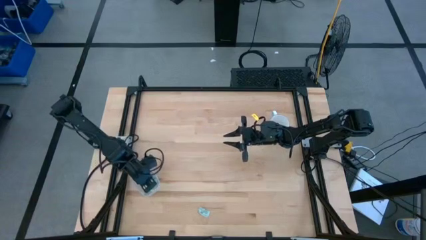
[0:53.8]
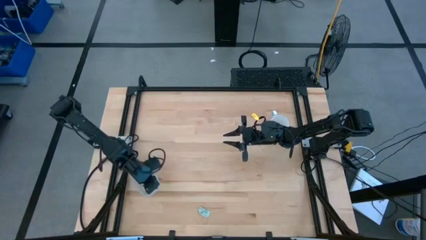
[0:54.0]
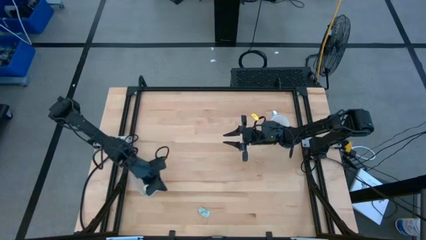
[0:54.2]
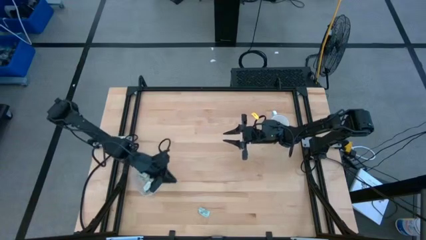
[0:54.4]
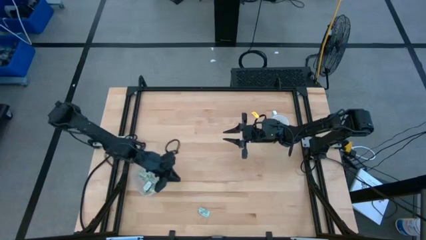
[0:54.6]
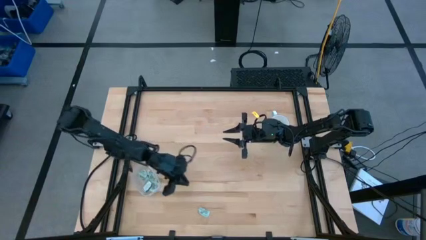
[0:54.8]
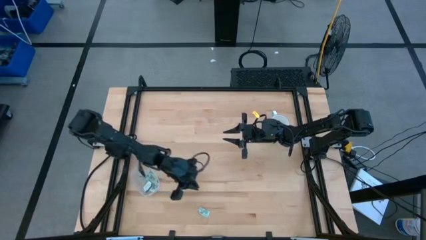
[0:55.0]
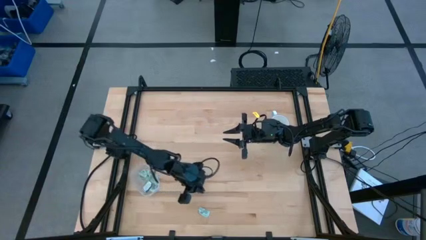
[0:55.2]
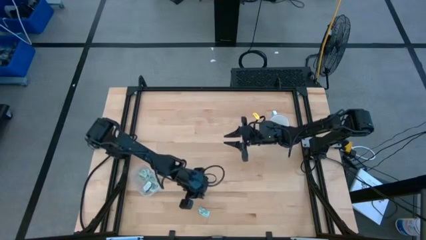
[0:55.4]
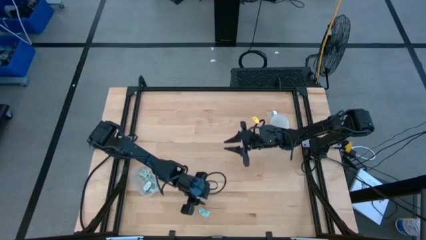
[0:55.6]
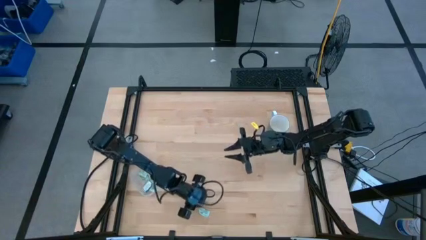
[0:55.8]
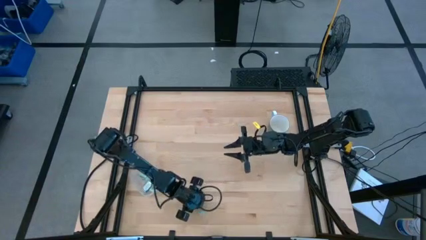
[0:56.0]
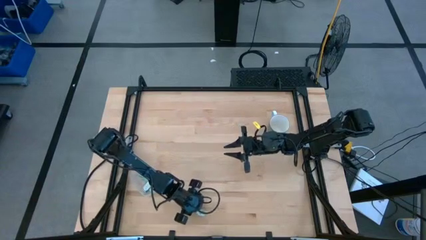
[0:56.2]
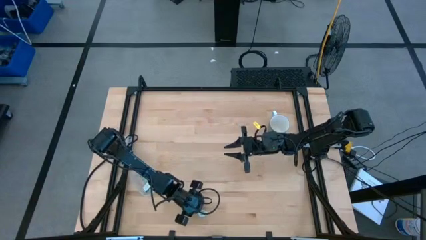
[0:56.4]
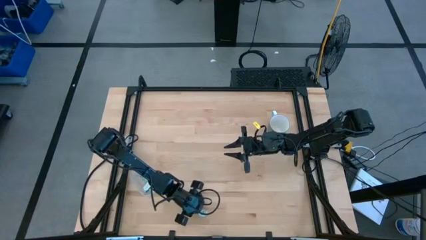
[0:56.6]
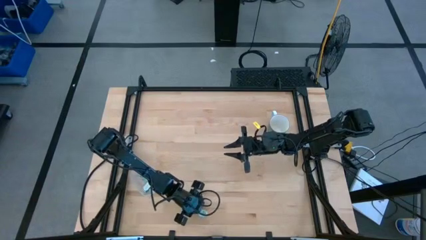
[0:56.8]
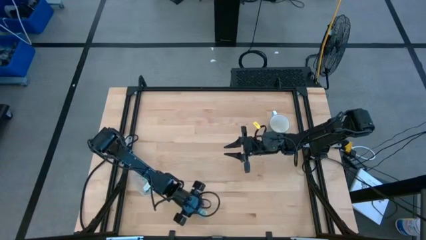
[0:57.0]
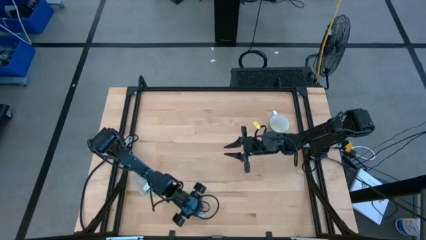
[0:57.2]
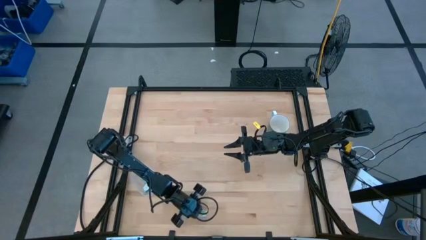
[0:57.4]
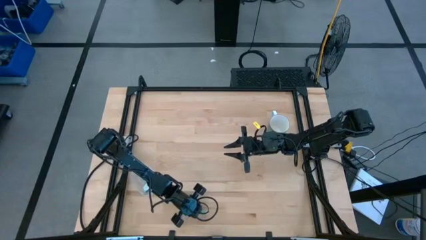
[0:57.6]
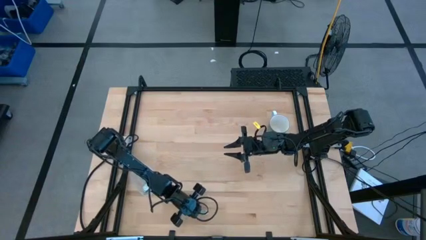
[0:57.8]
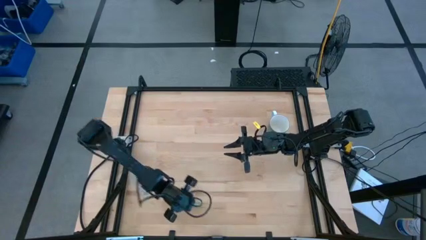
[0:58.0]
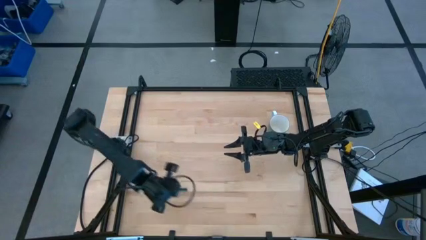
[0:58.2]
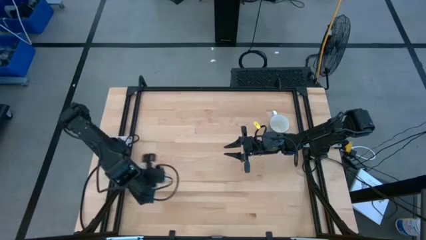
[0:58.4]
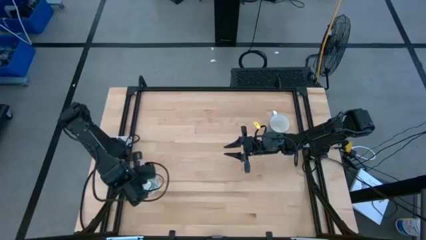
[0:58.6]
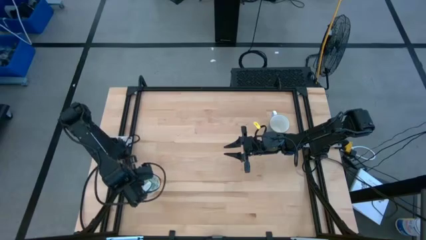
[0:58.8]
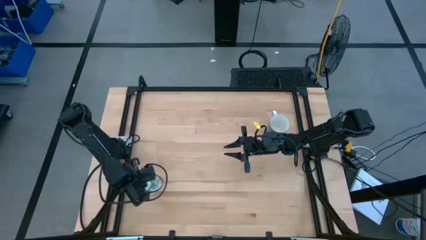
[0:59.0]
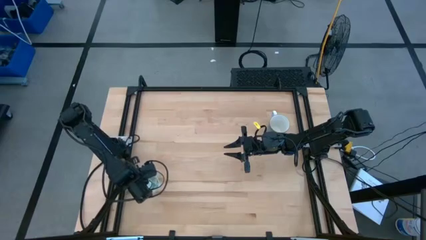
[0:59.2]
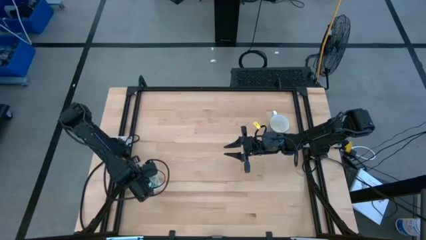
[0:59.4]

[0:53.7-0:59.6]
Task: Pick and place Stevia / Truvia into bins
Put the stevia packet into the transparent container

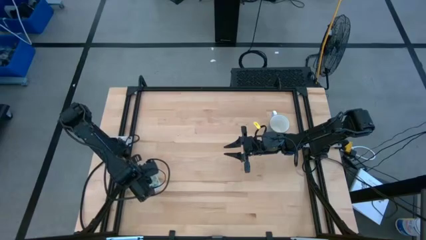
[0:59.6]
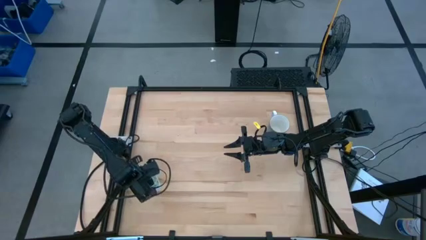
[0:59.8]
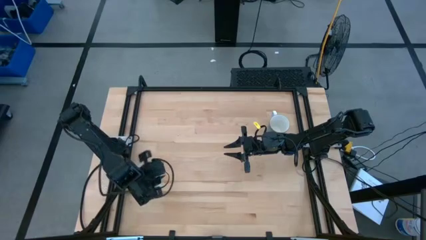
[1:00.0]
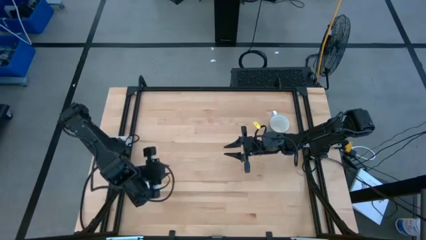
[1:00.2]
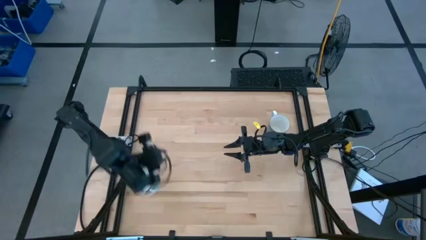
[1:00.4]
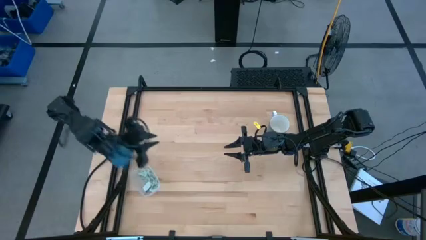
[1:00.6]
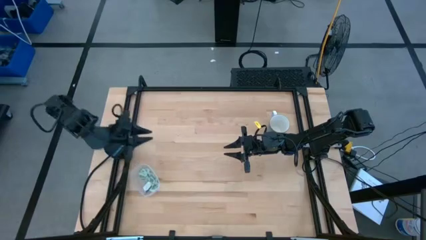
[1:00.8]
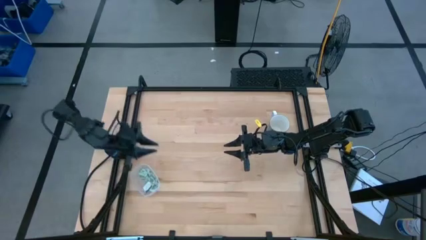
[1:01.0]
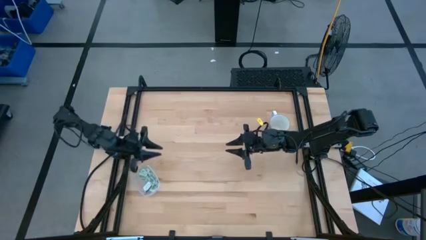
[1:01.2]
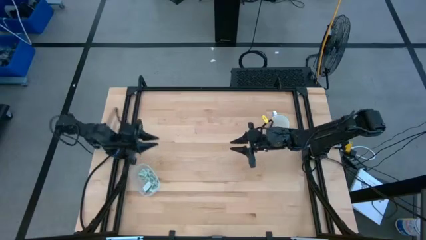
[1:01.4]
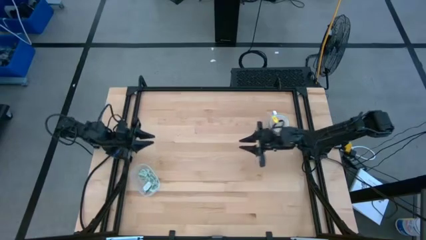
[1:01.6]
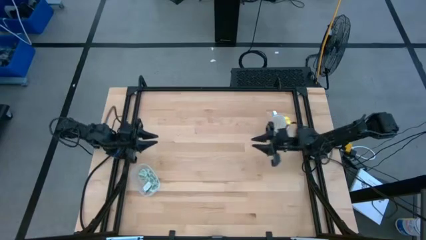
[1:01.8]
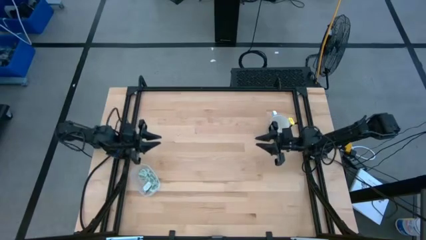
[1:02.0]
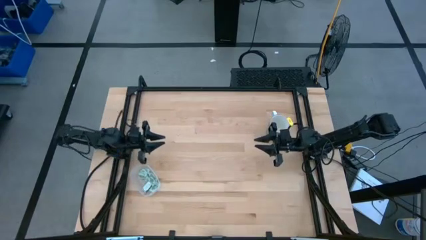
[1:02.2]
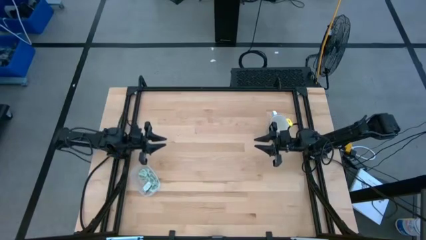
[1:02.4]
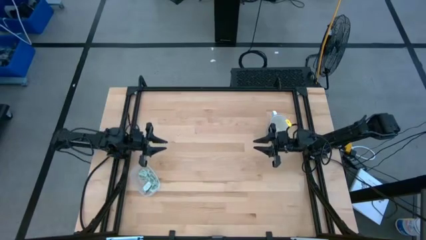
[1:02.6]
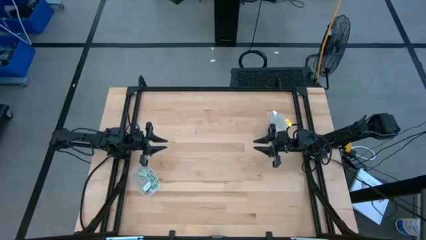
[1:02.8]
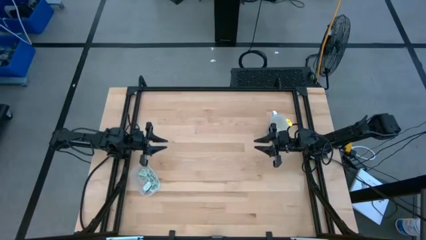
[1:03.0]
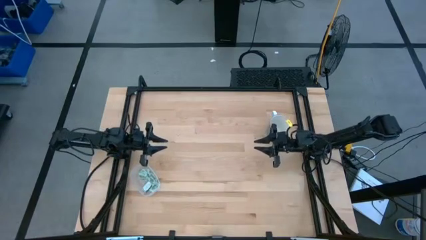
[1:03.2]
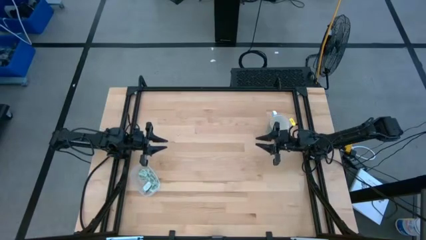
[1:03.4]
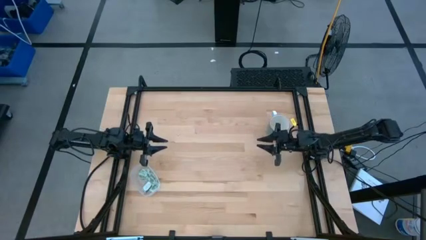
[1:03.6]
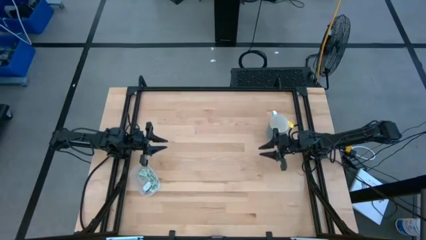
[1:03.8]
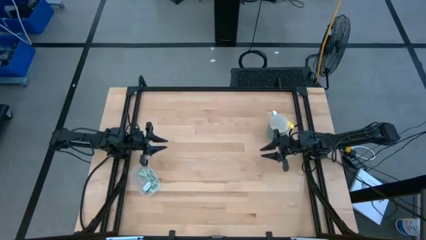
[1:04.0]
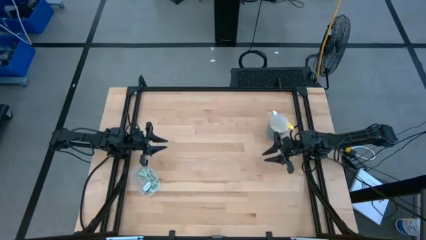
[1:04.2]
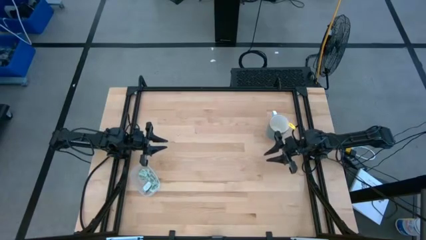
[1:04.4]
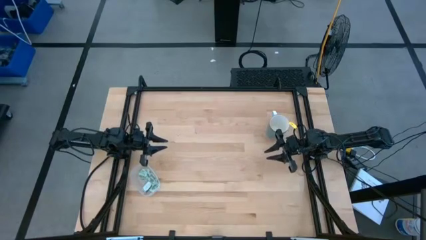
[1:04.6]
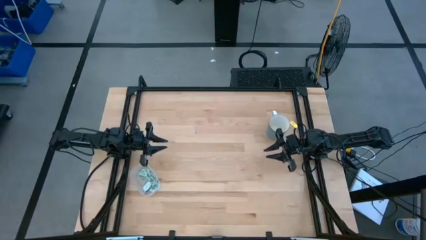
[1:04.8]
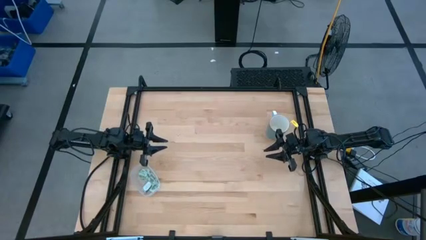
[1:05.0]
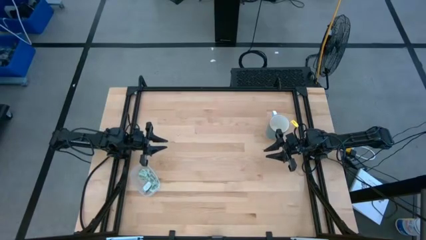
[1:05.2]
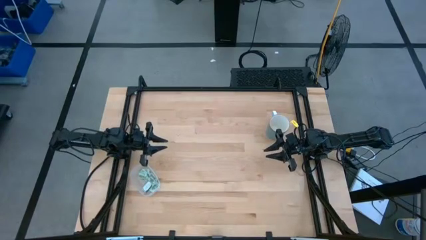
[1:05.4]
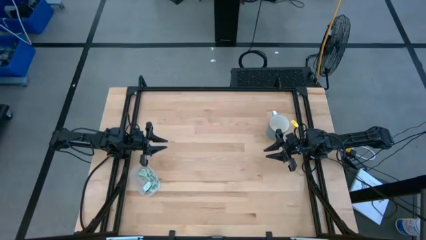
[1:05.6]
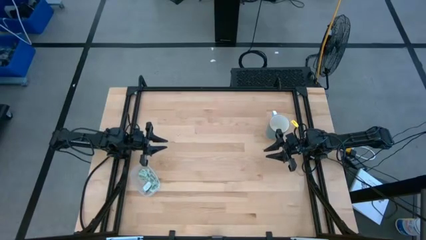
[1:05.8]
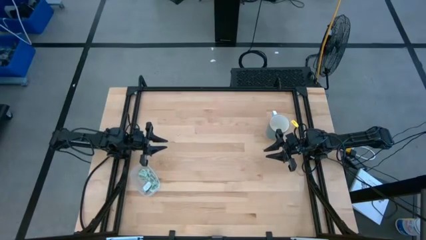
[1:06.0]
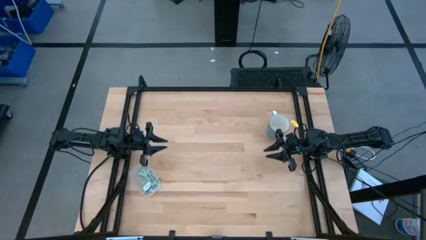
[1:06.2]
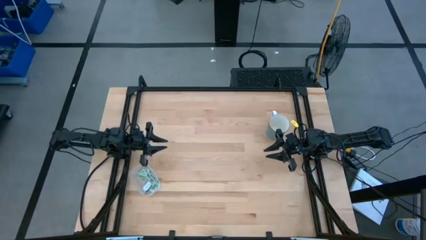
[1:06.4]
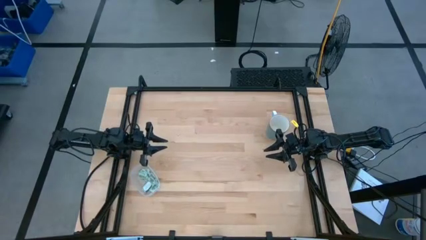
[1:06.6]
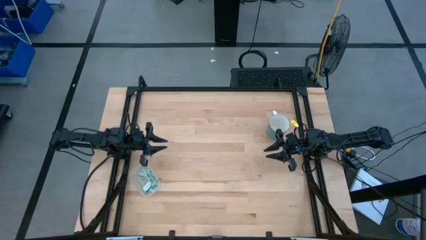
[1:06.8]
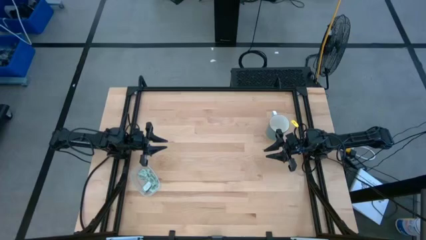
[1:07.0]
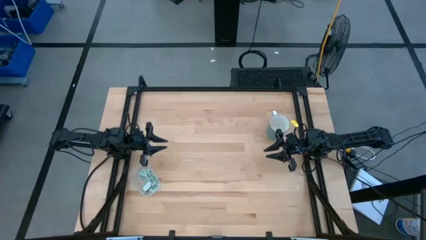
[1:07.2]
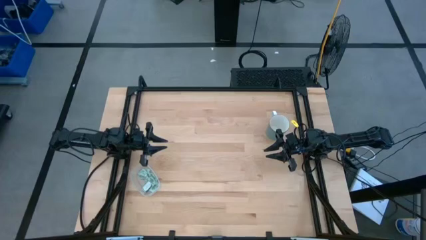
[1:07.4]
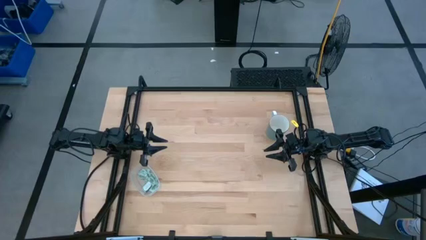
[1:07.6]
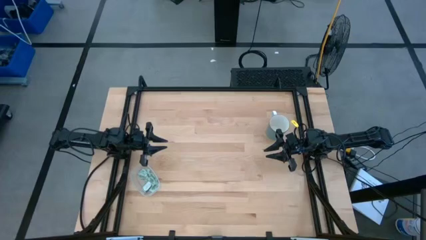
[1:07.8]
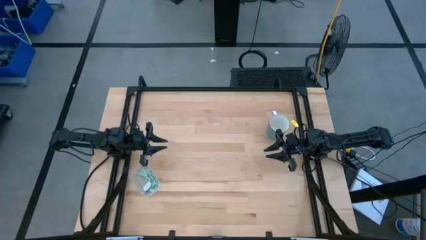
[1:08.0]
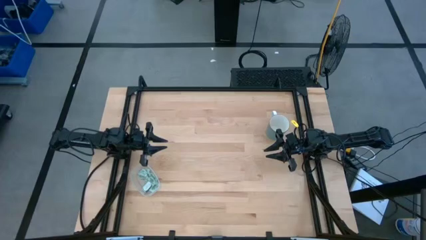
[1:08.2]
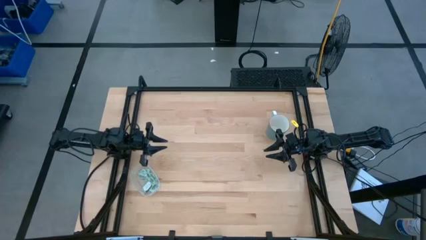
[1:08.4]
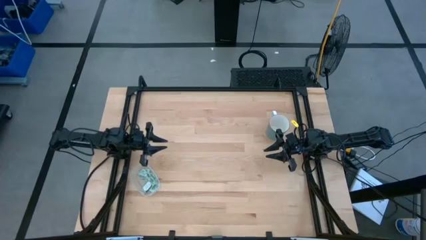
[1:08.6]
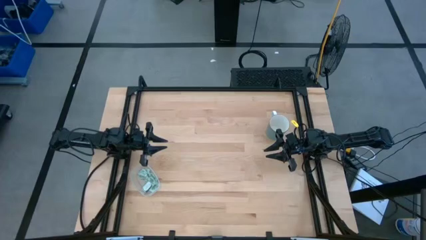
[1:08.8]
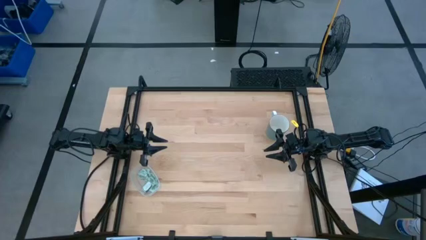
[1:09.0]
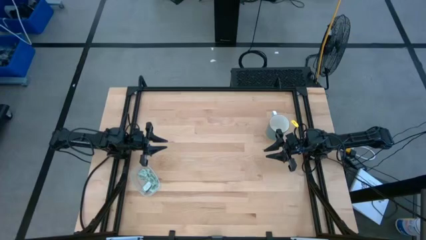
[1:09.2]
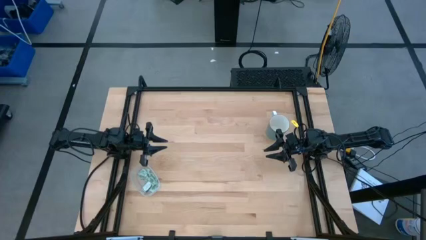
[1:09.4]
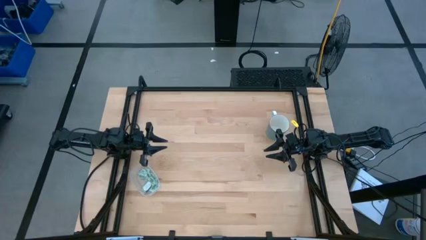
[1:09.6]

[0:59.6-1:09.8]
Return to Home Position
